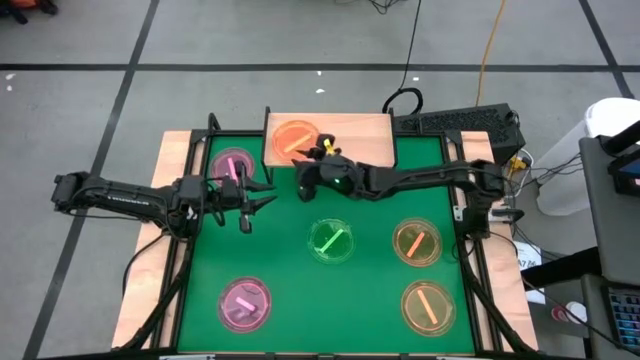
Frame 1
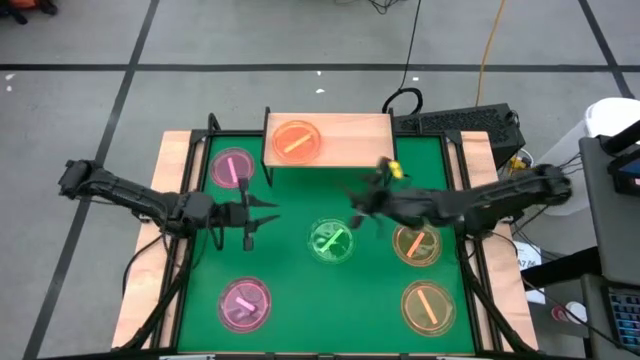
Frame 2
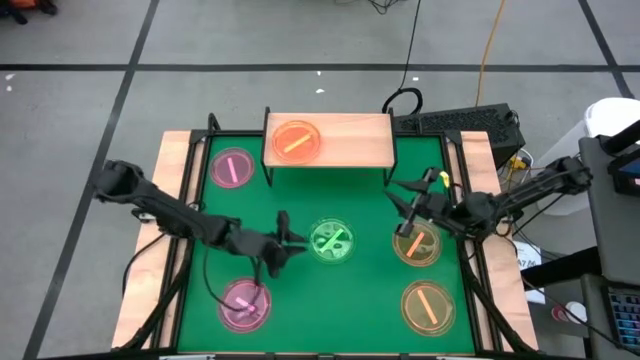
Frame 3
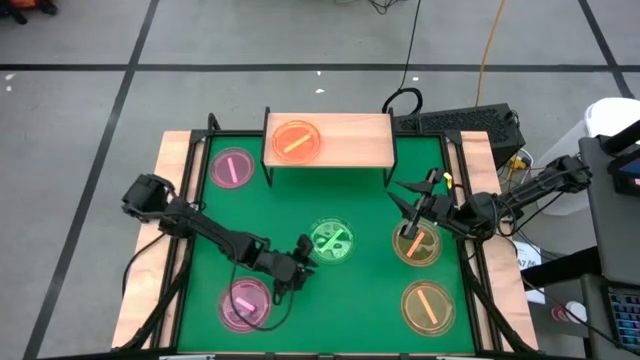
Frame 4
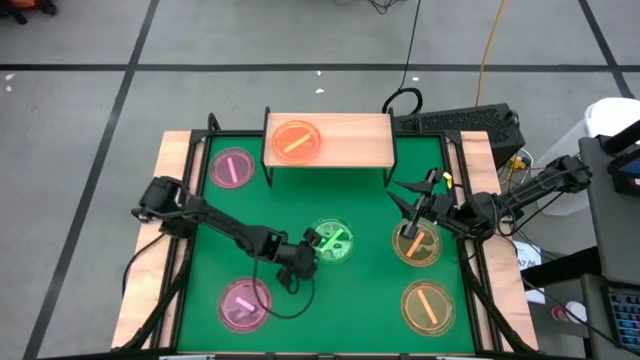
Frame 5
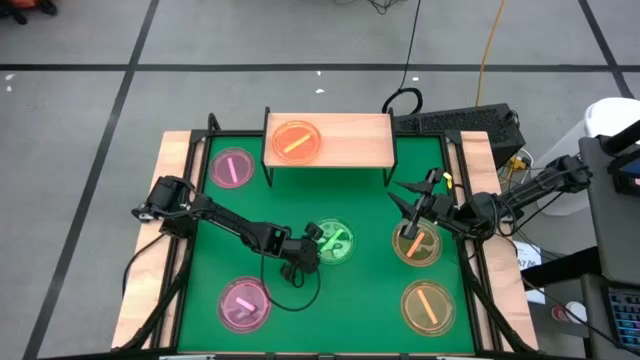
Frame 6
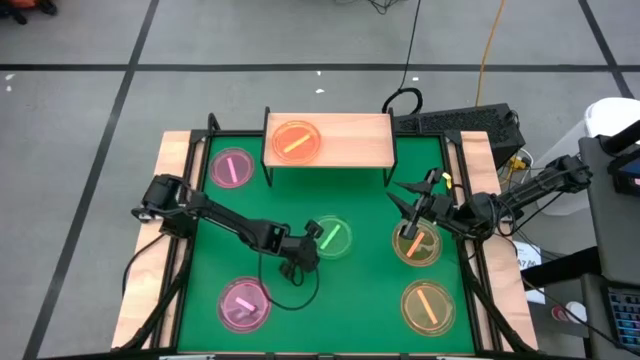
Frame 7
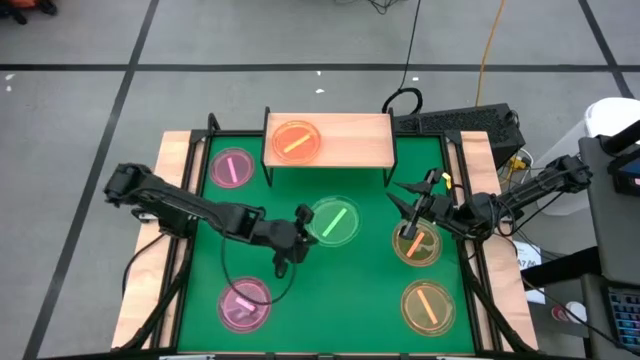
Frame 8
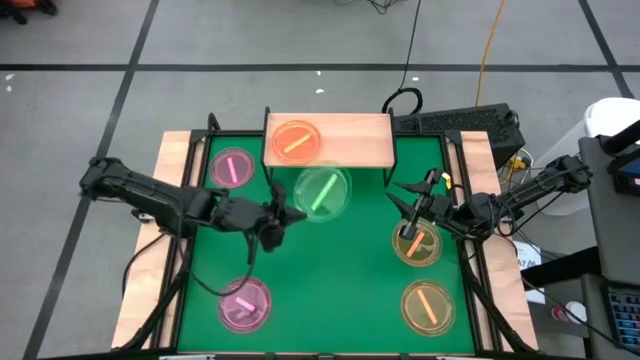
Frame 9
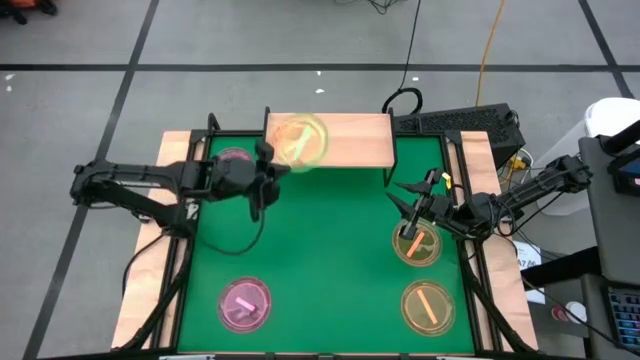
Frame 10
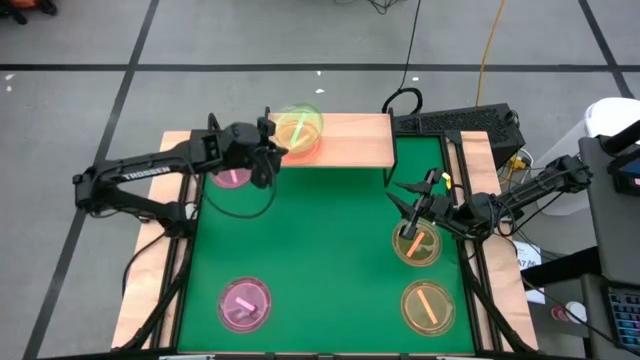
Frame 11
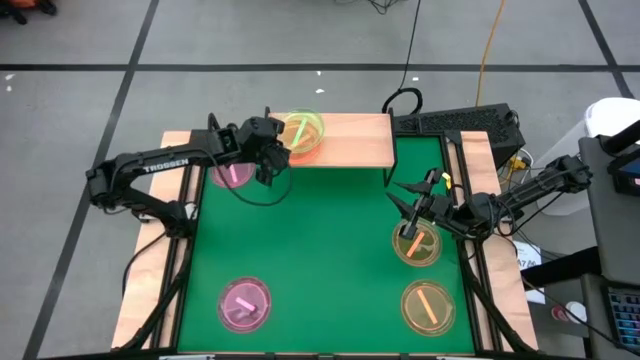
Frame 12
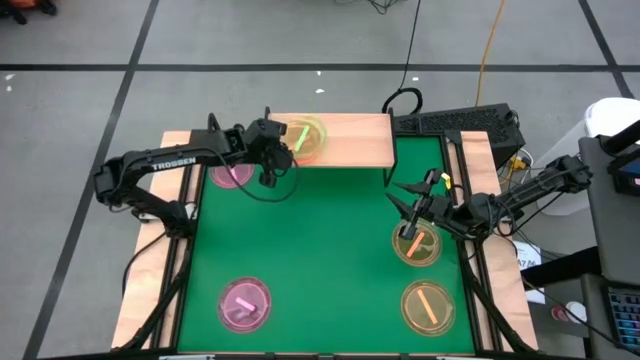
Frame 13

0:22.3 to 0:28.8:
Task: Place and stack plates onto a shelf
Stack the green plate on top of the orange plate on the shelf

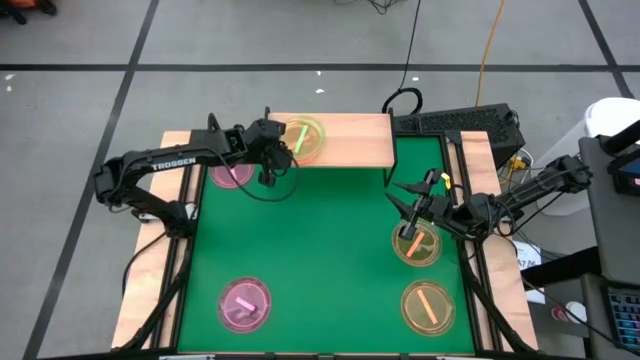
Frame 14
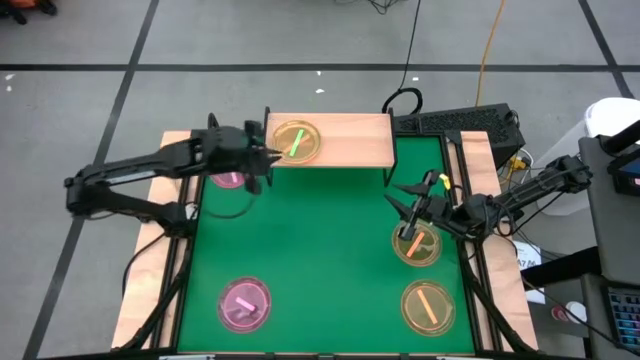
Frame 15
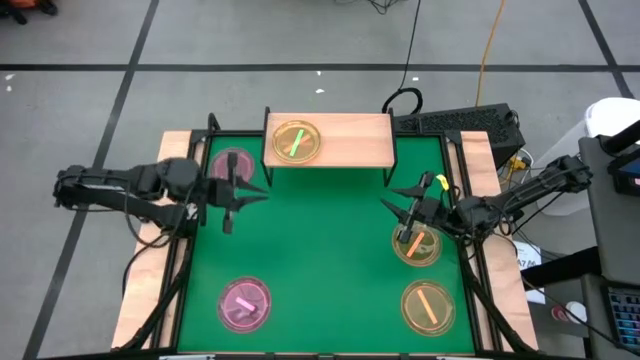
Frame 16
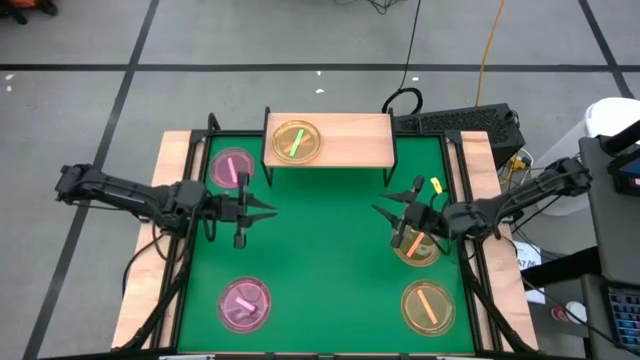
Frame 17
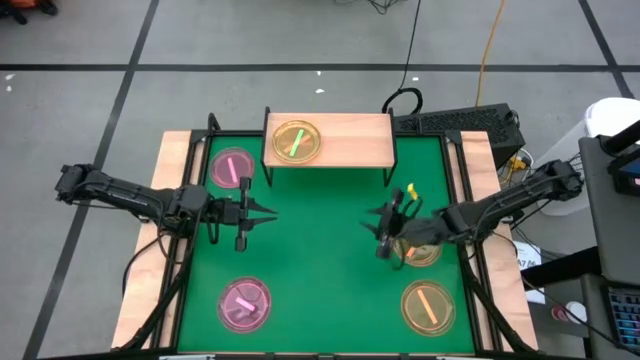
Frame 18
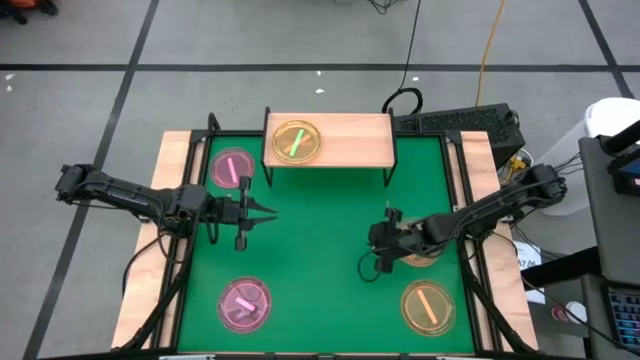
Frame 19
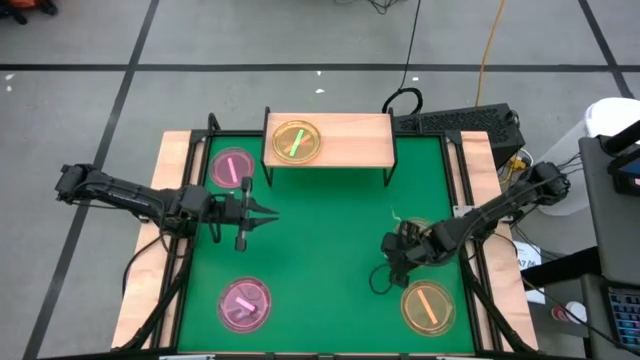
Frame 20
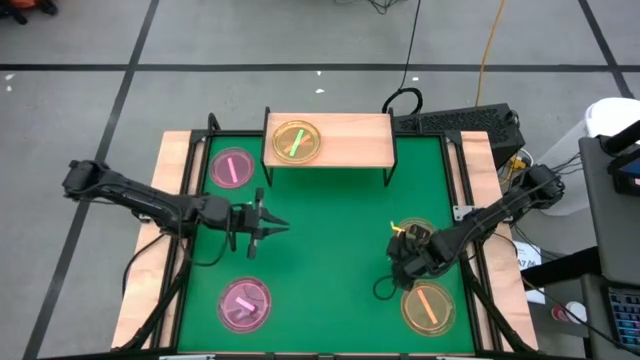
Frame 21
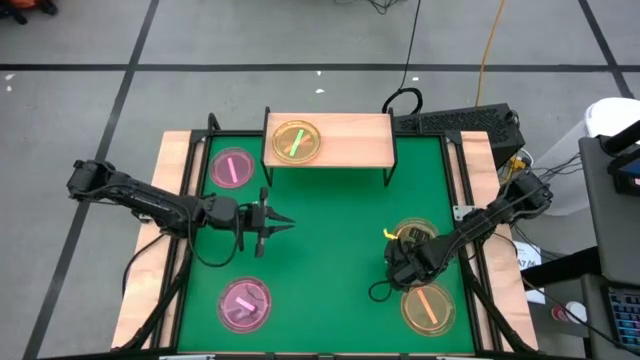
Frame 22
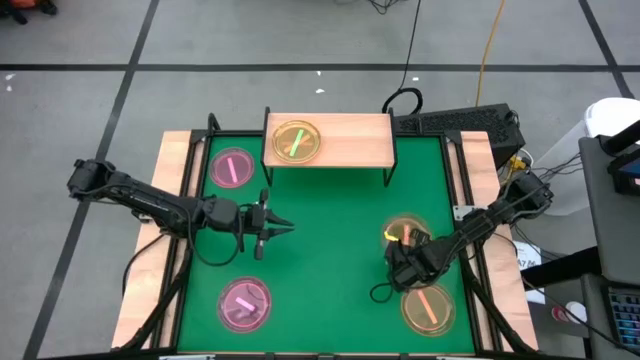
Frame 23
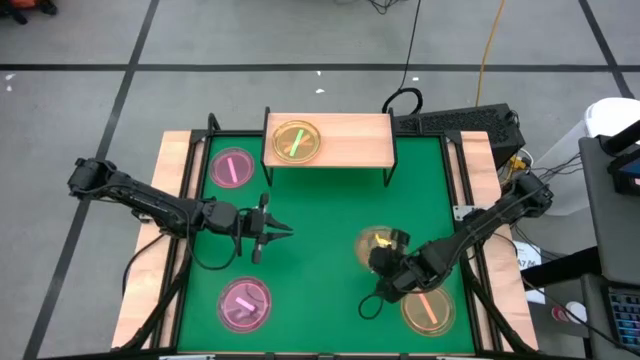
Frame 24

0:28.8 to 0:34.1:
Put the orange plate on the shelf

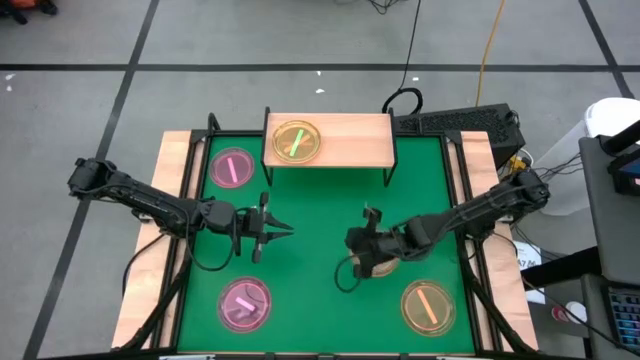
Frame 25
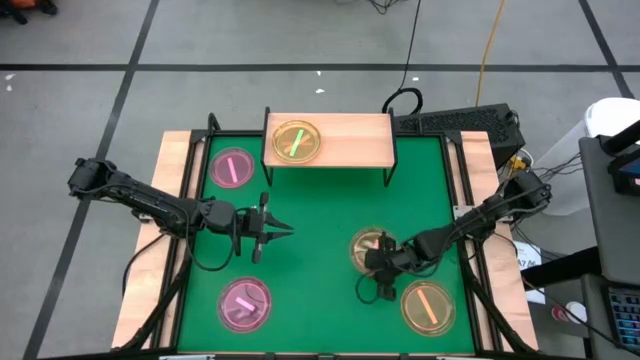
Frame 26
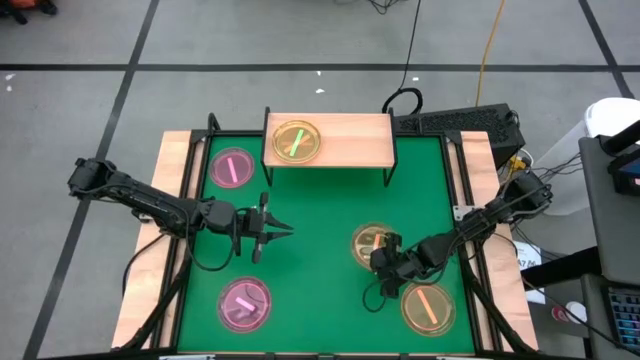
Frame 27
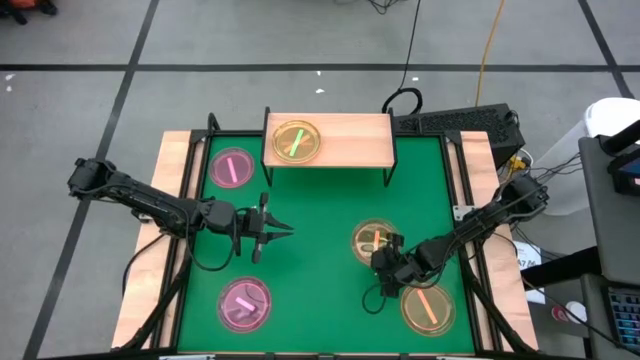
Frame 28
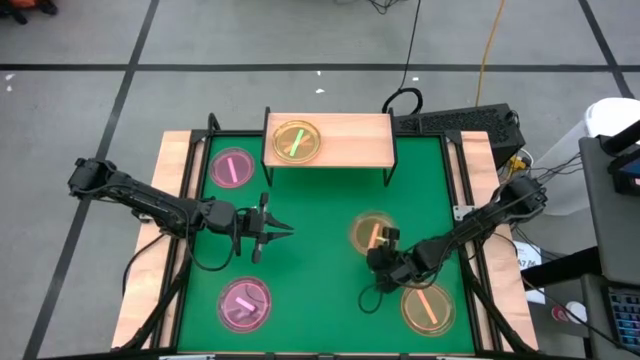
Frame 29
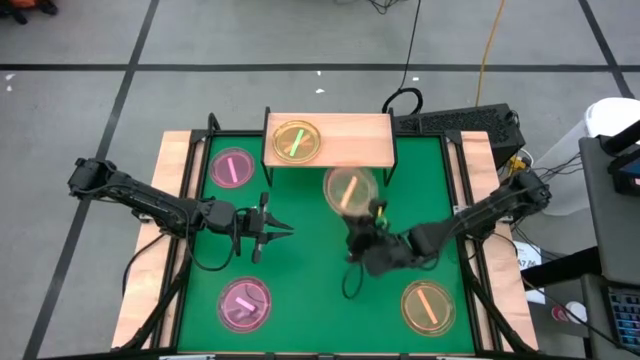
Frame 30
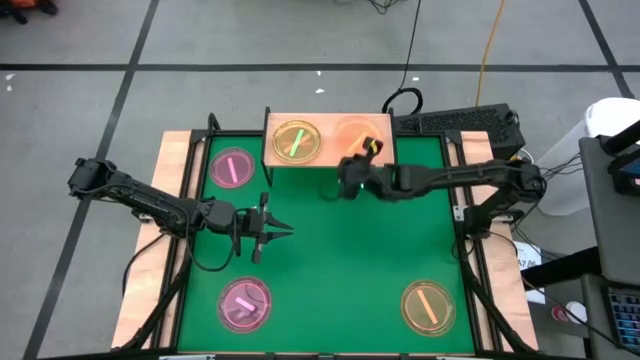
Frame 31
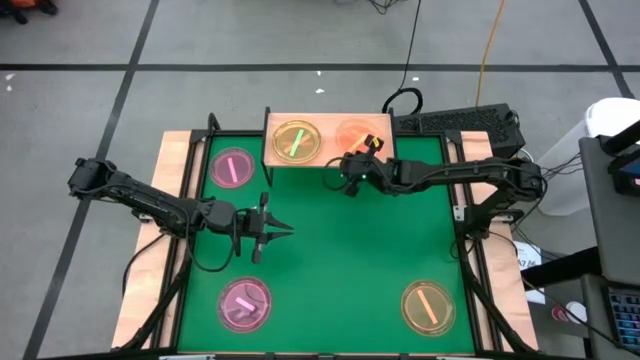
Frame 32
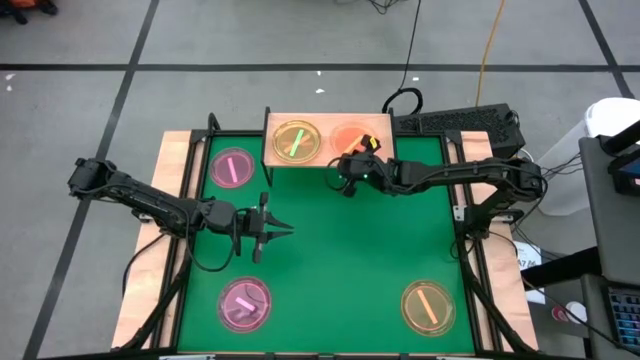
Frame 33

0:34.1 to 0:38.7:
Put the orange plate on the shelf

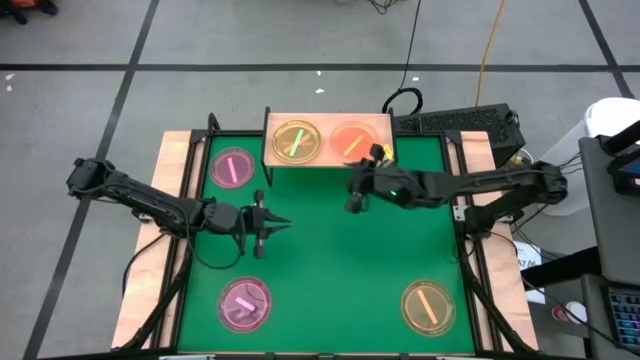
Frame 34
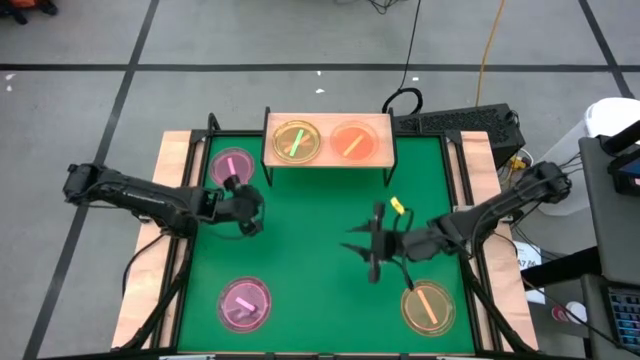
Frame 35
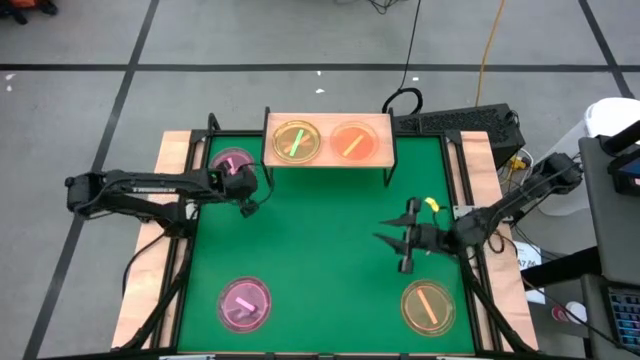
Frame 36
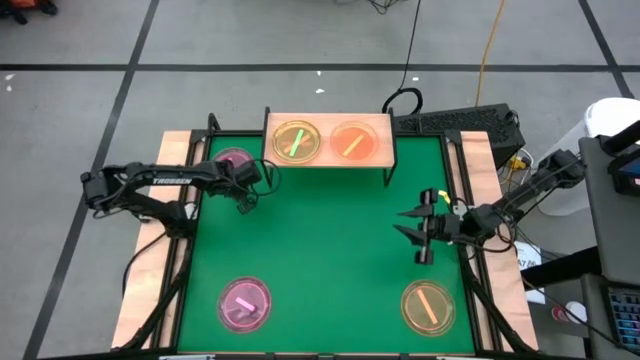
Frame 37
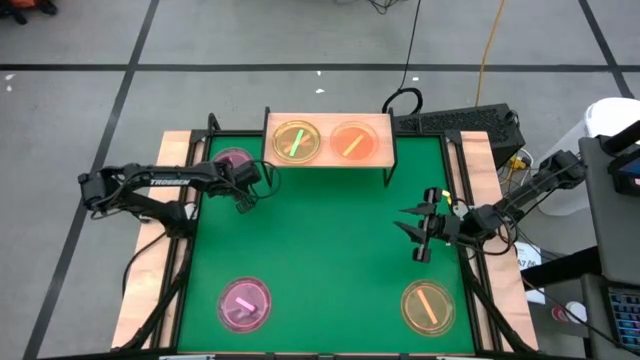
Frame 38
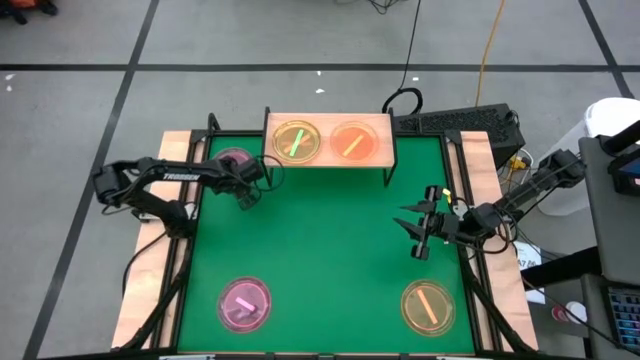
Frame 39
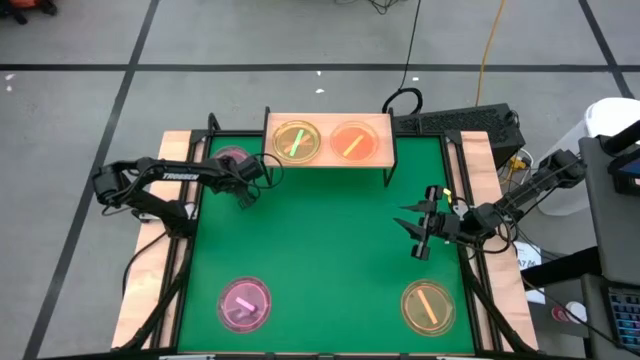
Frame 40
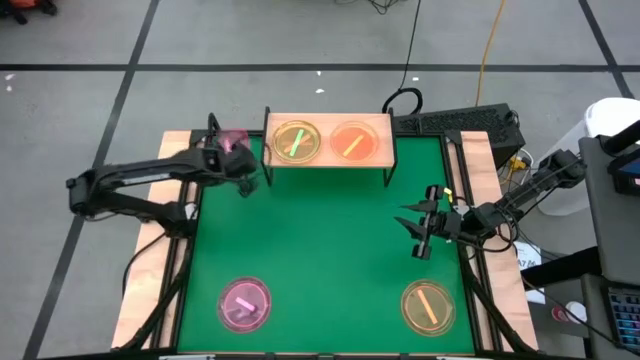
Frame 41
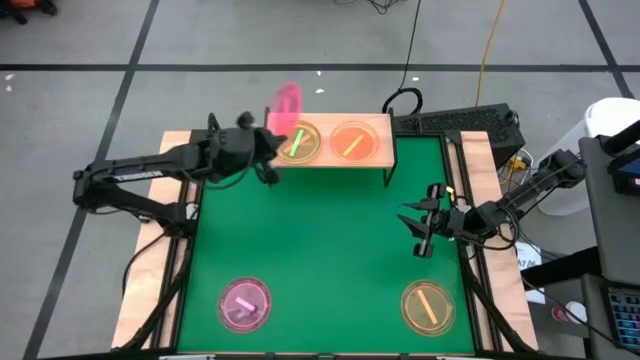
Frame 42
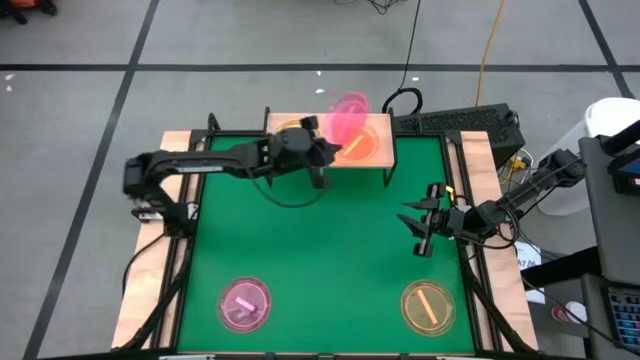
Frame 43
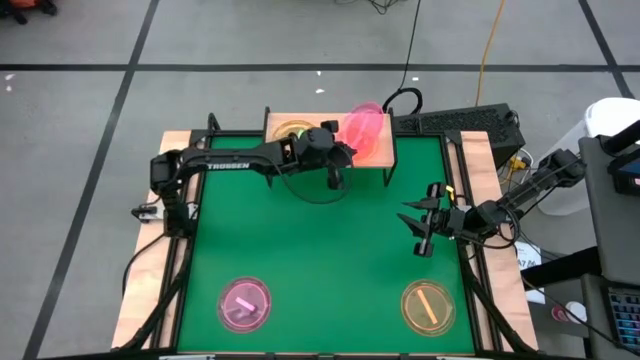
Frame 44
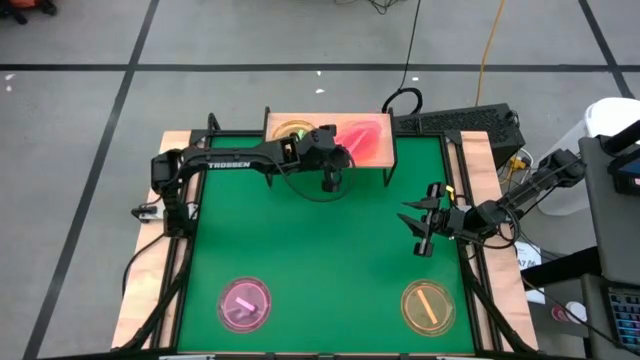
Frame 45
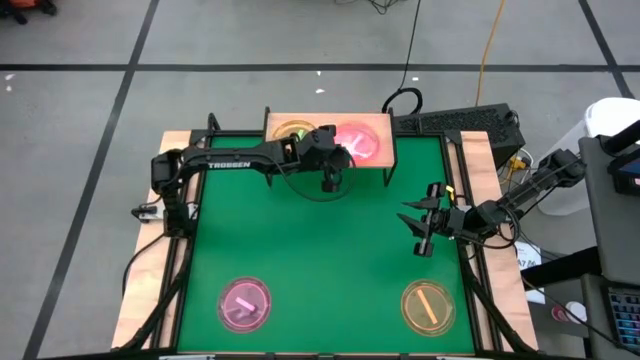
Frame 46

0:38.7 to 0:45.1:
Stack the top pink plate on top of the orange plate on the shelf
